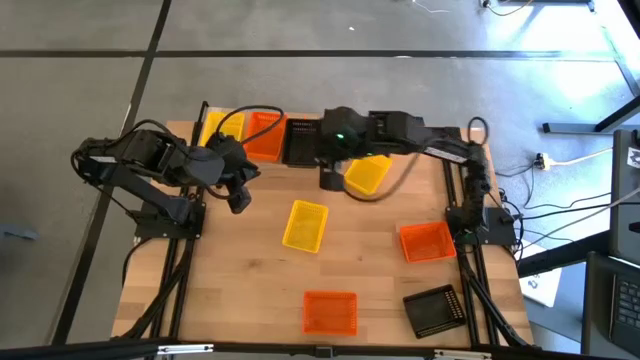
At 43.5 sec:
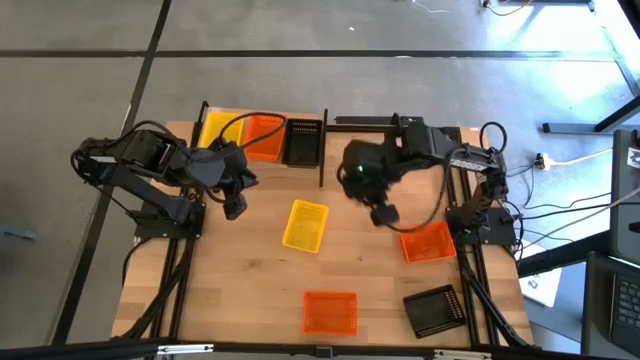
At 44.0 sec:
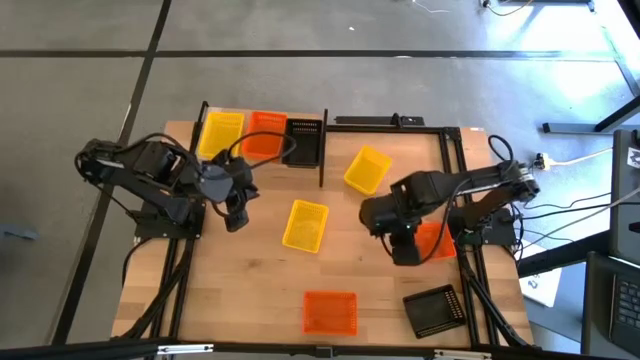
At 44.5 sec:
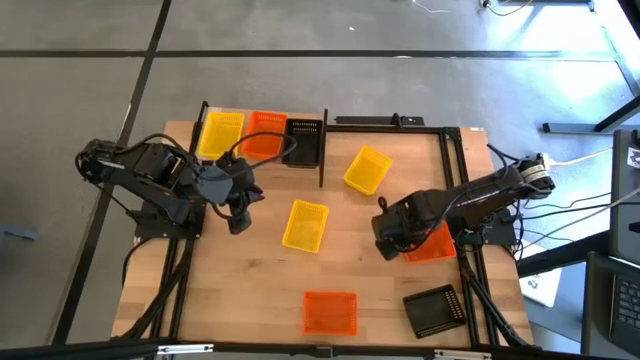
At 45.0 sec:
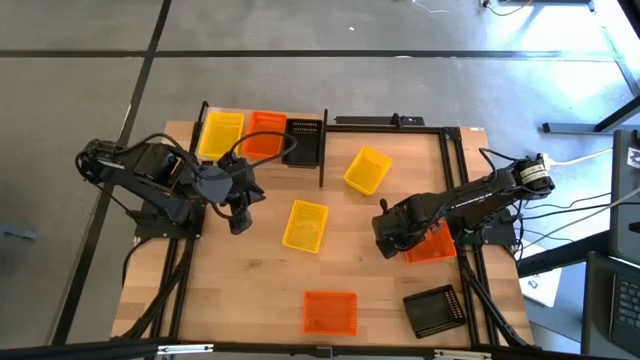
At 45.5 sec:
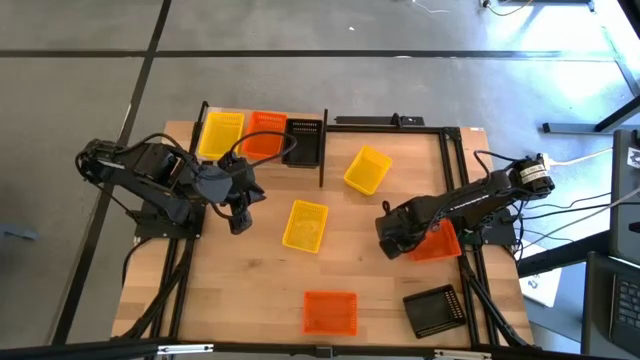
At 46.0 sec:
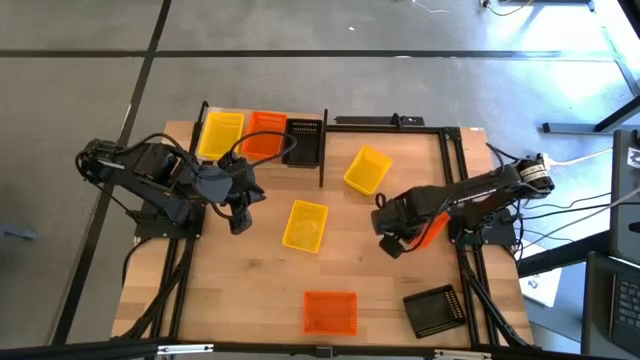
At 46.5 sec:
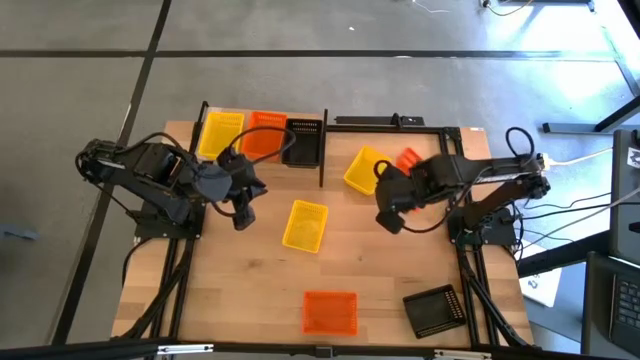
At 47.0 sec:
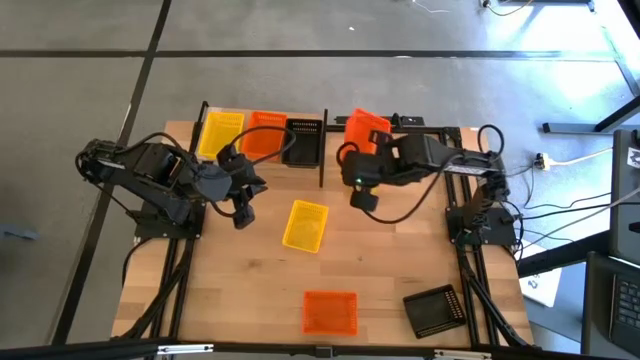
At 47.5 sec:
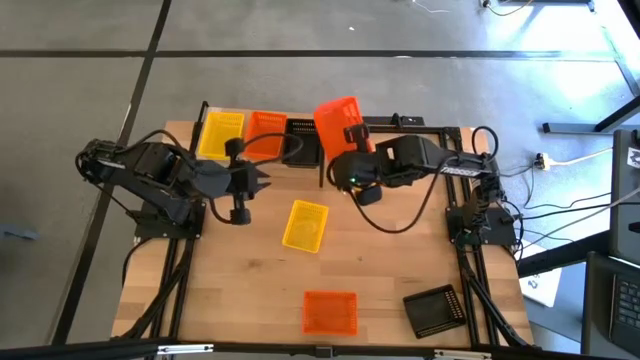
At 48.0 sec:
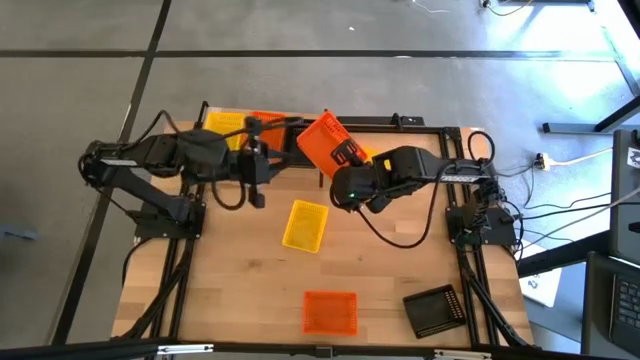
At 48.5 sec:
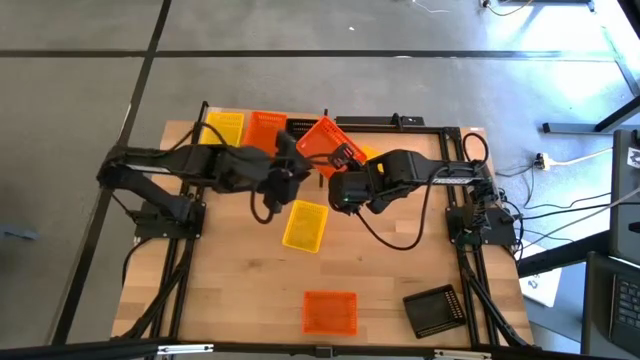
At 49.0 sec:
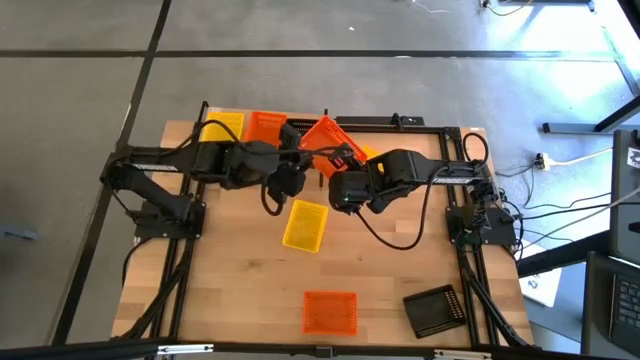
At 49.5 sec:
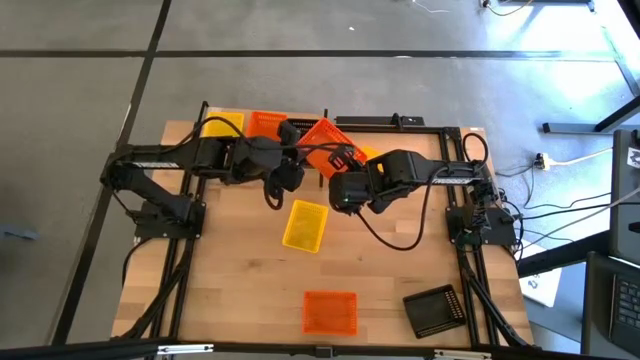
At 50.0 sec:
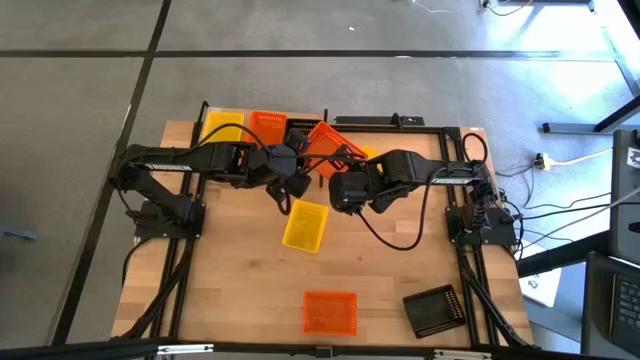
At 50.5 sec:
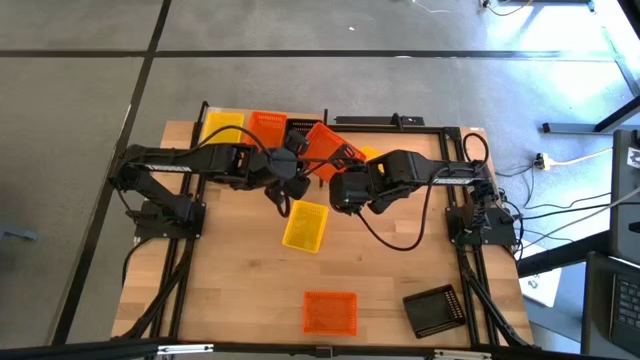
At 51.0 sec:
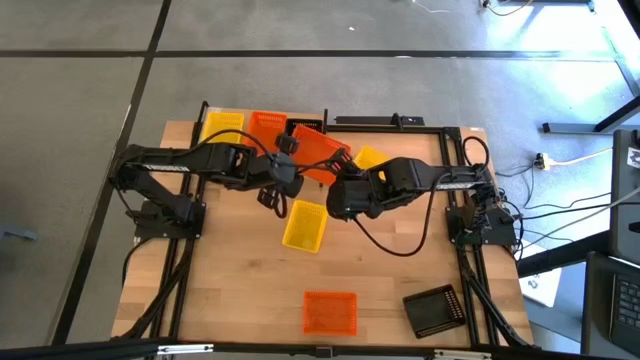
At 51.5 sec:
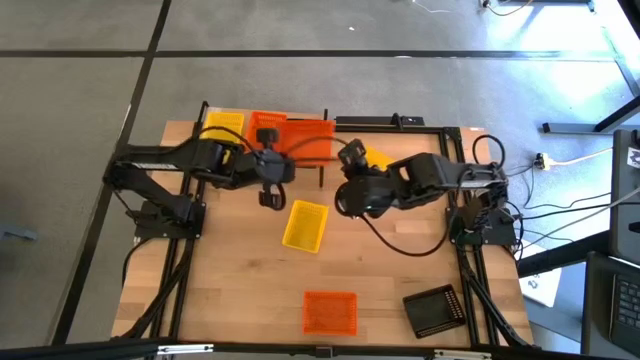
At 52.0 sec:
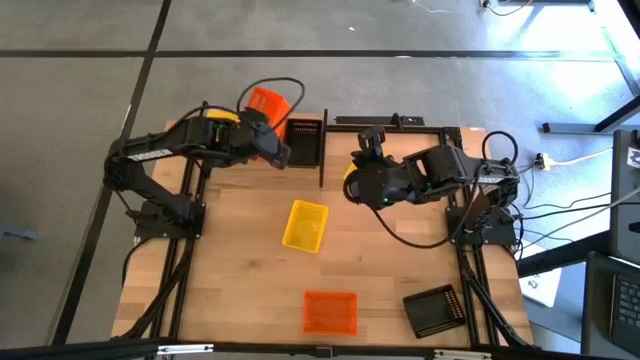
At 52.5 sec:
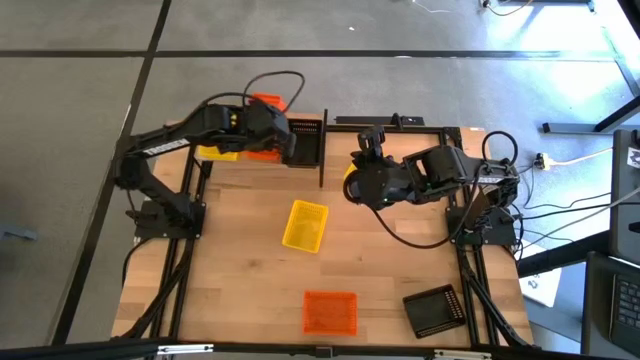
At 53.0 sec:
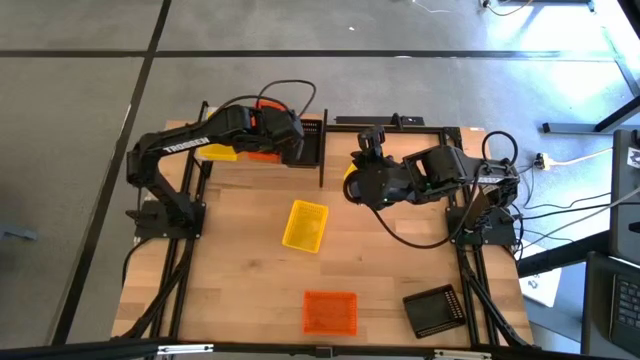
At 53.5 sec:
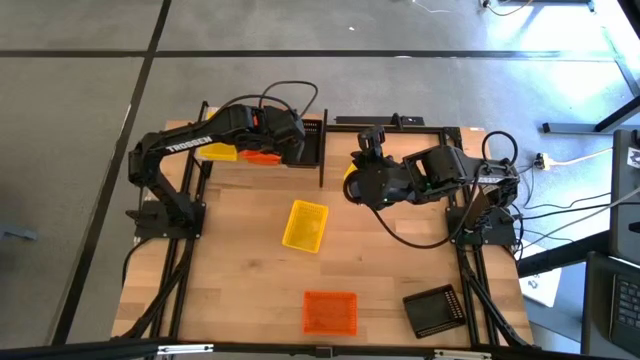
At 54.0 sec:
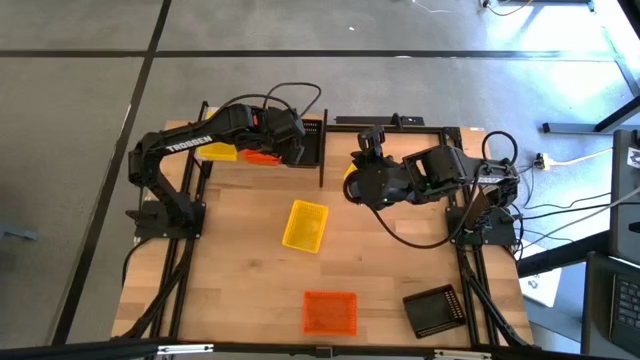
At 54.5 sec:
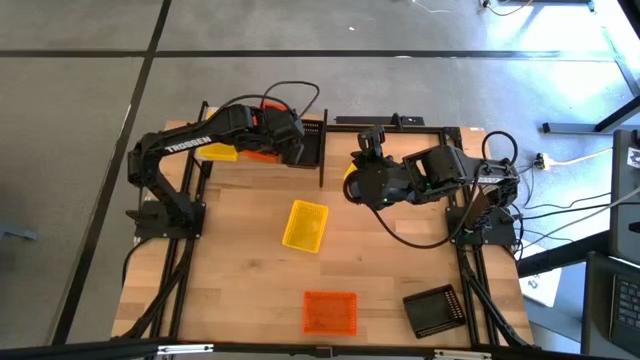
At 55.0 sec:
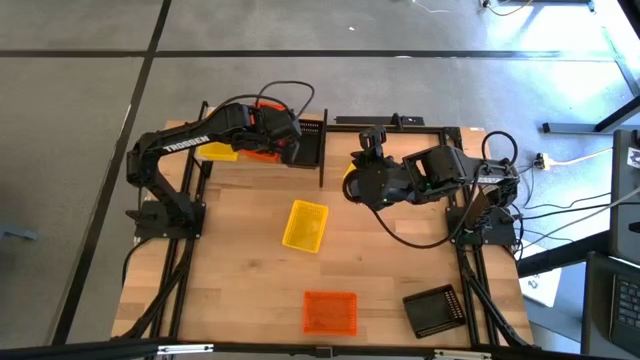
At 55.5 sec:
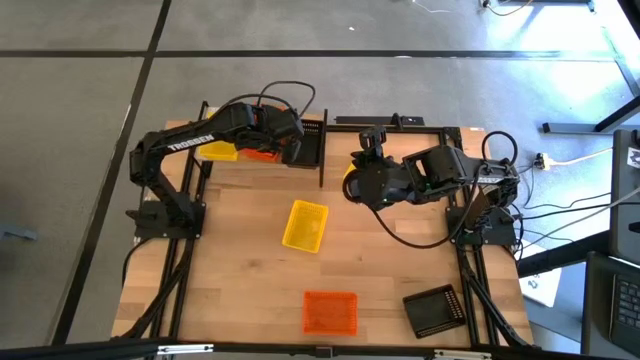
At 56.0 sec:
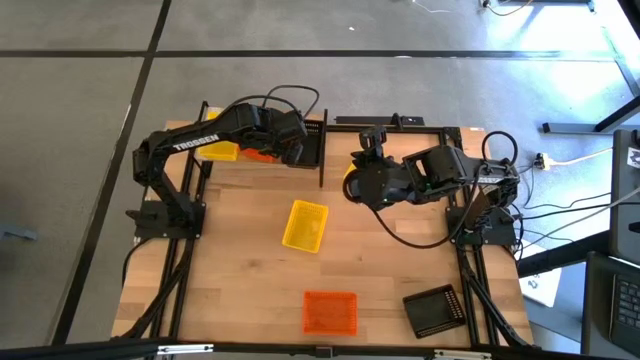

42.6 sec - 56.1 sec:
Task: Stack baskets on shelf by color
Stack the top orange basket on top of the orange basket on the shelf

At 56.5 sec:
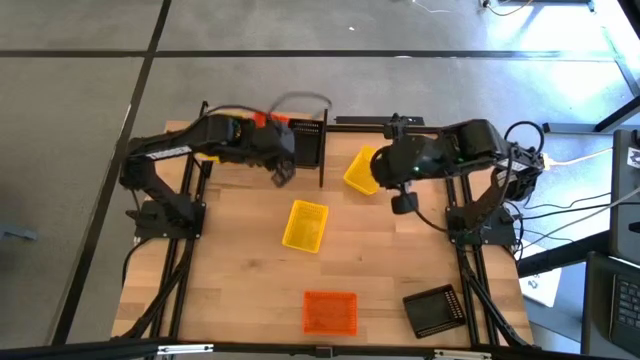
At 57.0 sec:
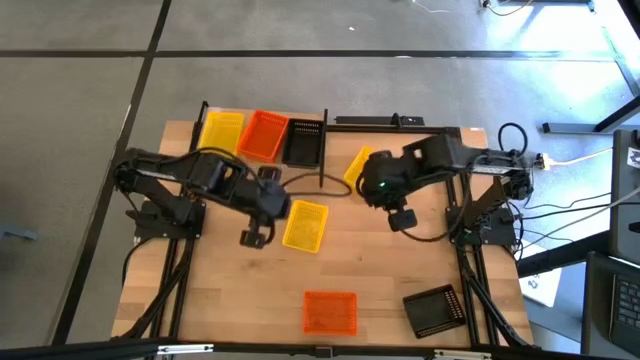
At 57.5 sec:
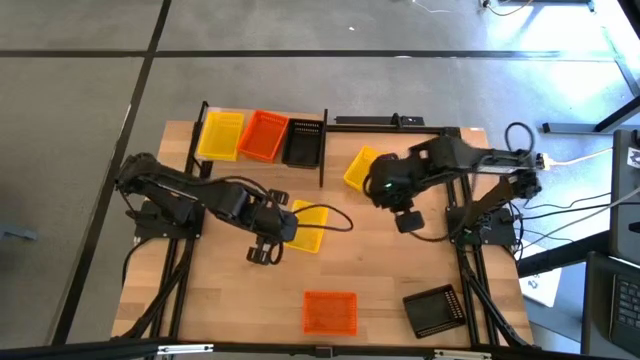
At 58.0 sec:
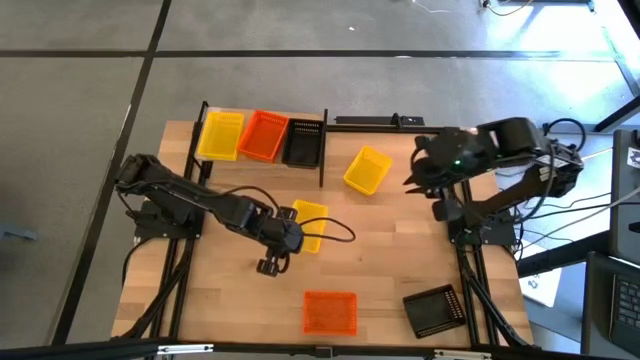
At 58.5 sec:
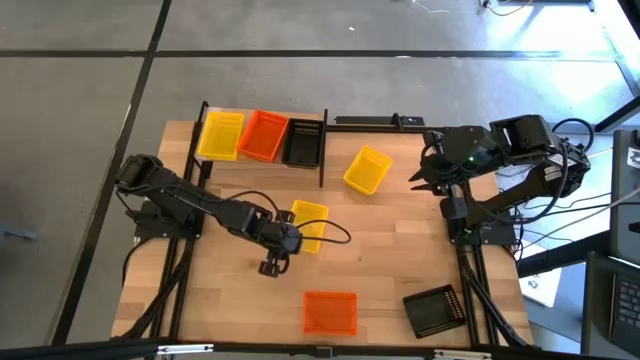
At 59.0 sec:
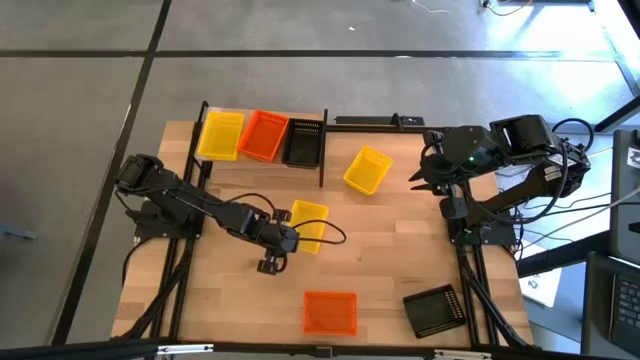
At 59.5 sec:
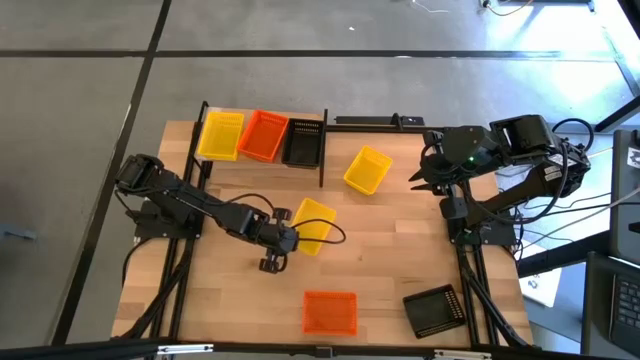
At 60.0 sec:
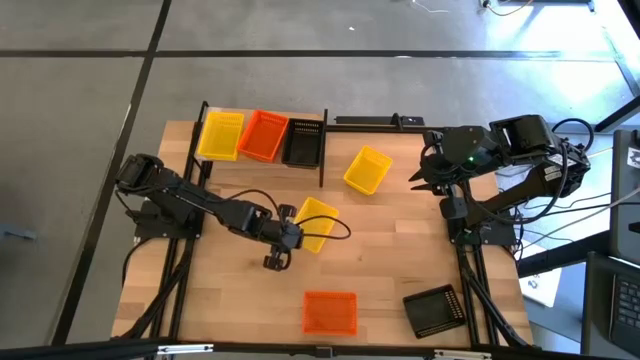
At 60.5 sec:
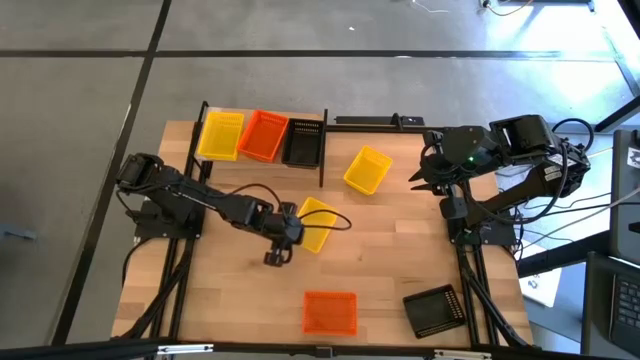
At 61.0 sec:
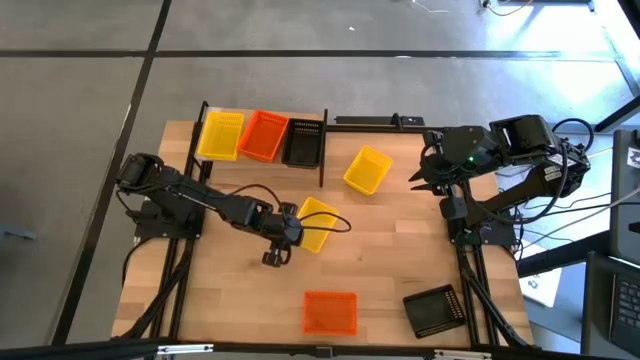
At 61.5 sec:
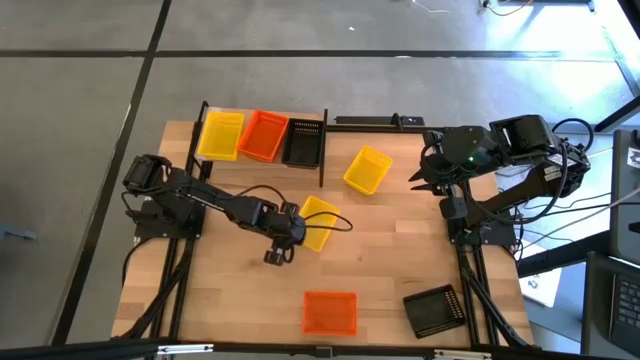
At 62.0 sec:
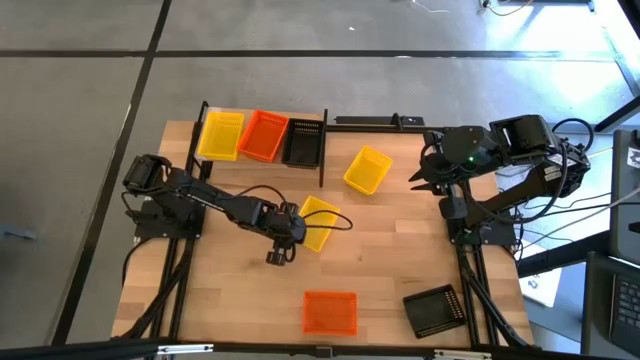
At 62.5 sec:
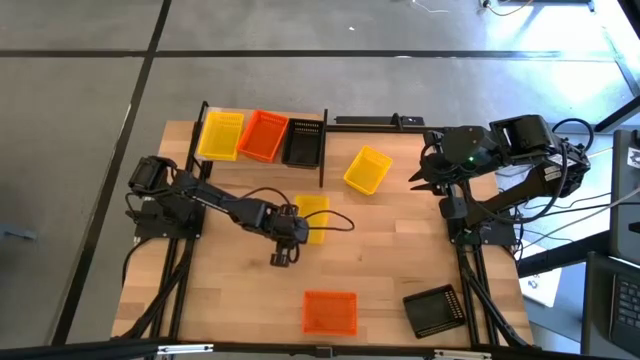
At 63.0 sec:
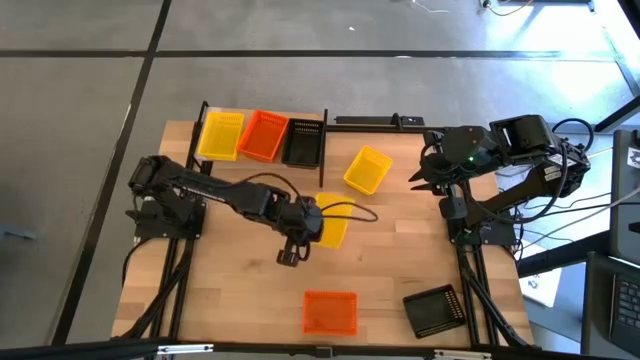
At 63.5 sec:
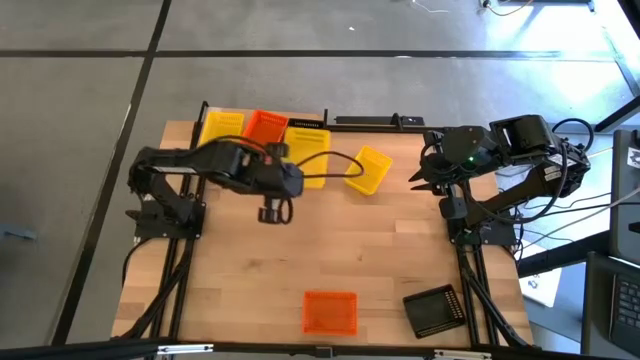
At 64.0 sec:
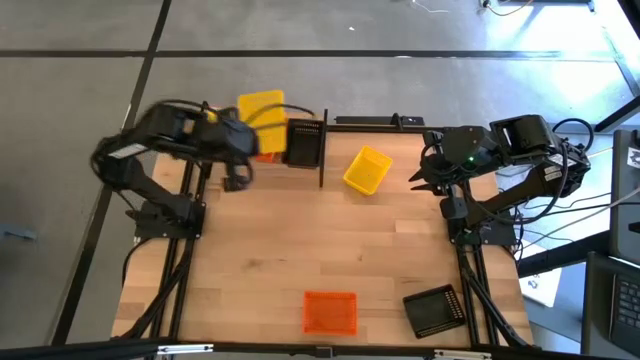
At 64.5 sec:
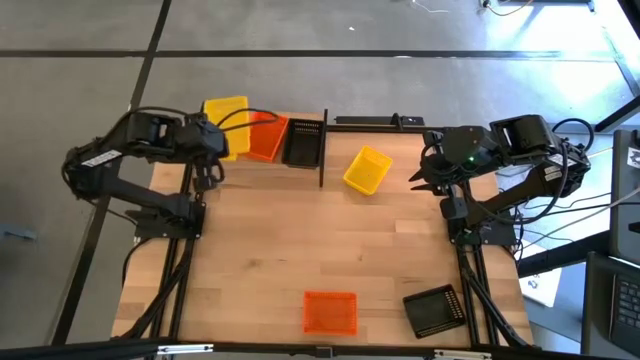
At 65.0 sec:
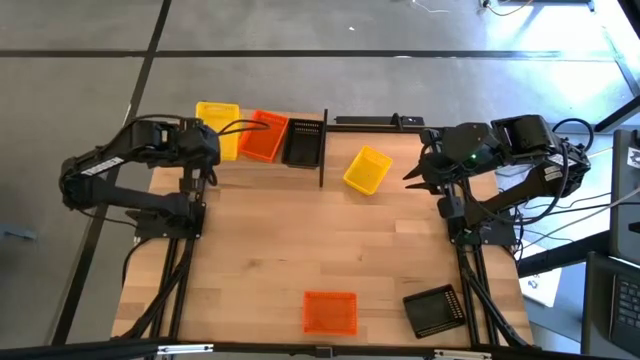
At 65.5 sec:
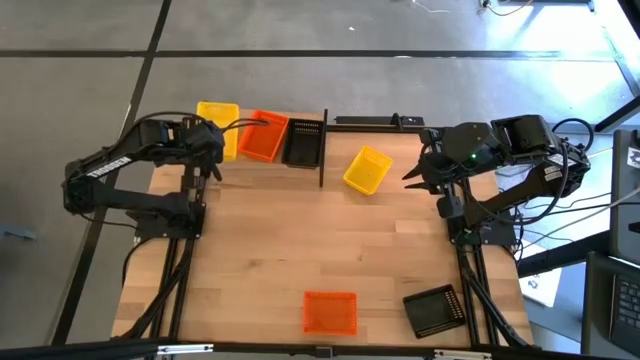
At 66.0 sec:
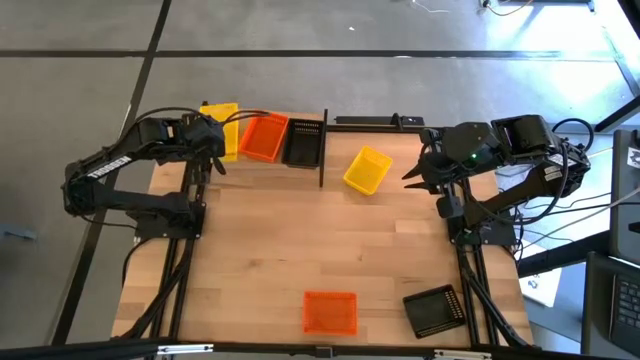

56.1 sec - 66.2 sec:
Stack the bottom yellow basket on top of the yellow basket on the shelf
